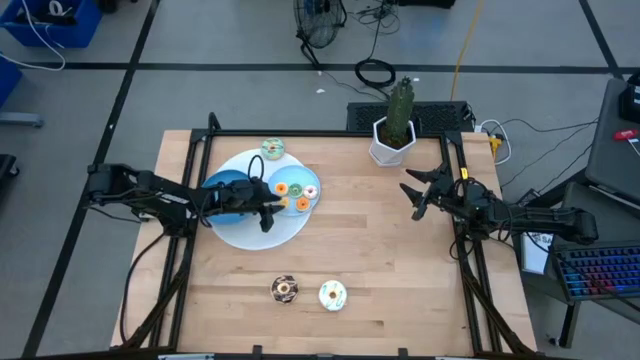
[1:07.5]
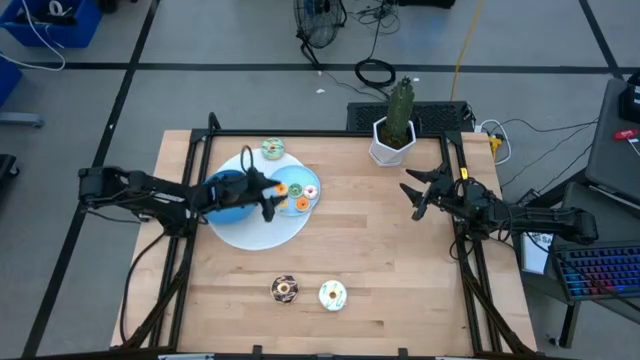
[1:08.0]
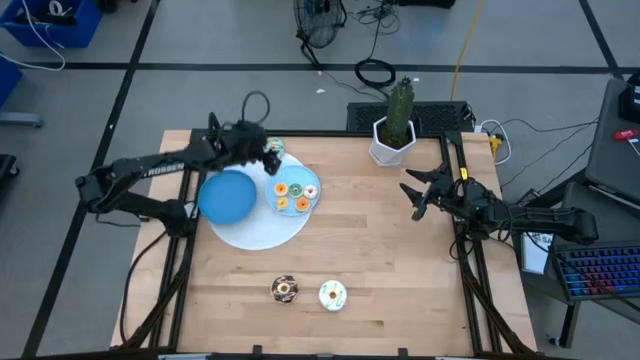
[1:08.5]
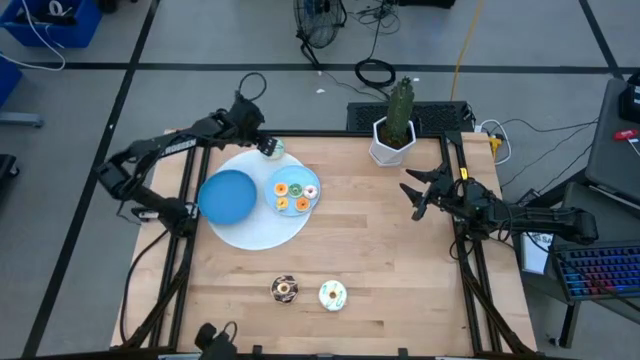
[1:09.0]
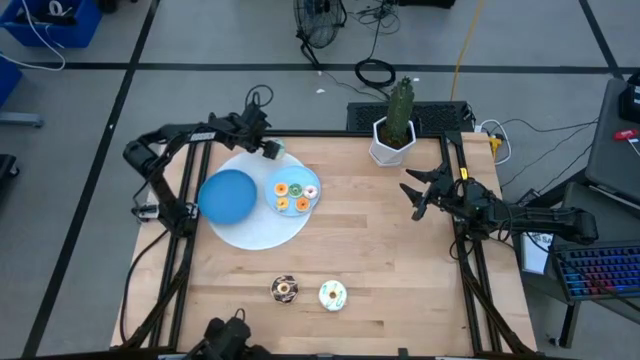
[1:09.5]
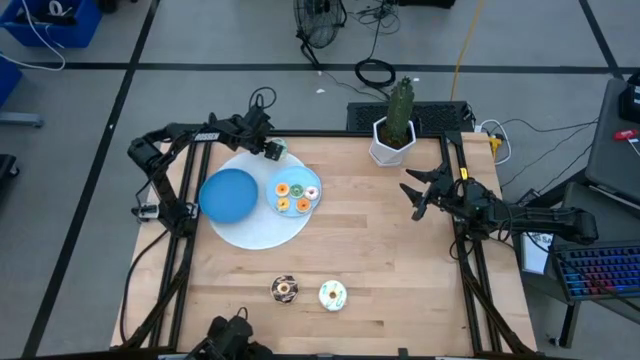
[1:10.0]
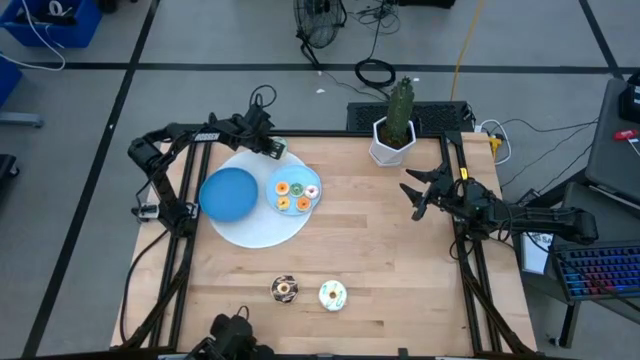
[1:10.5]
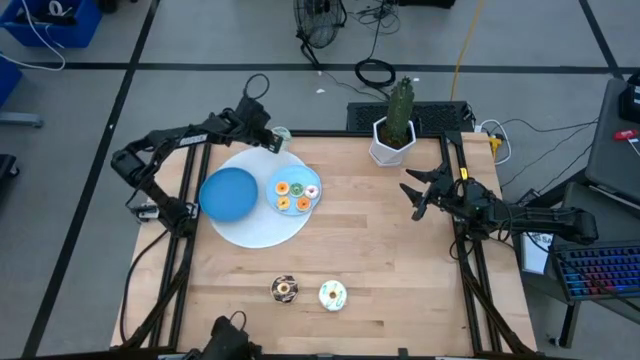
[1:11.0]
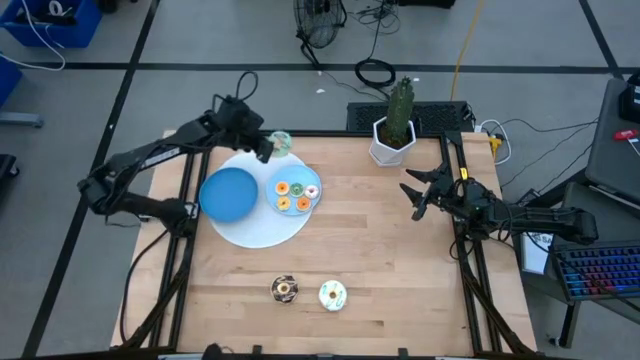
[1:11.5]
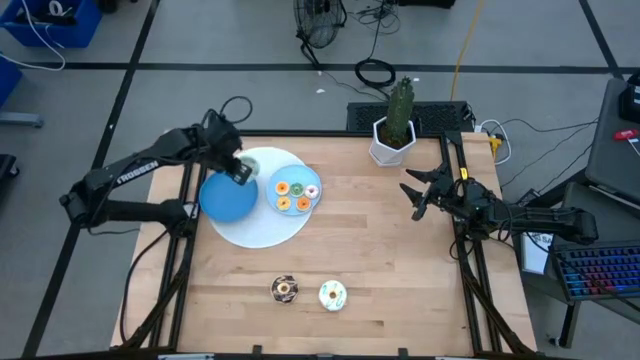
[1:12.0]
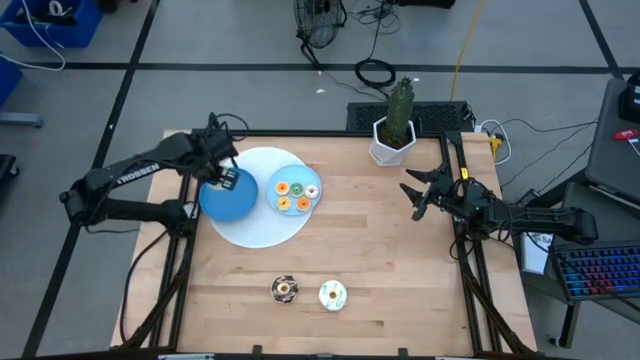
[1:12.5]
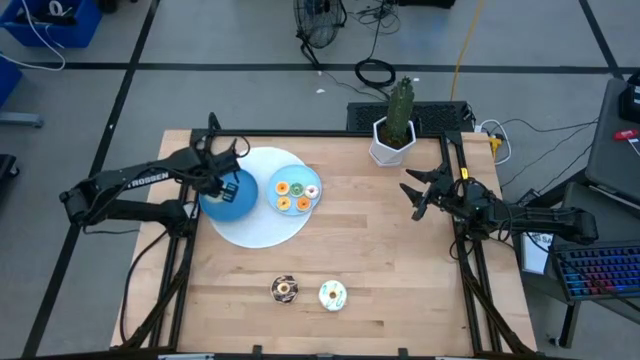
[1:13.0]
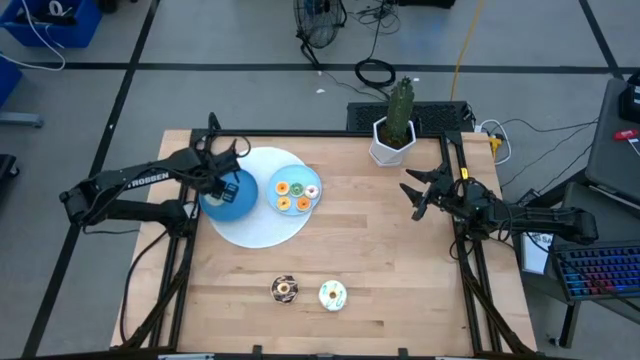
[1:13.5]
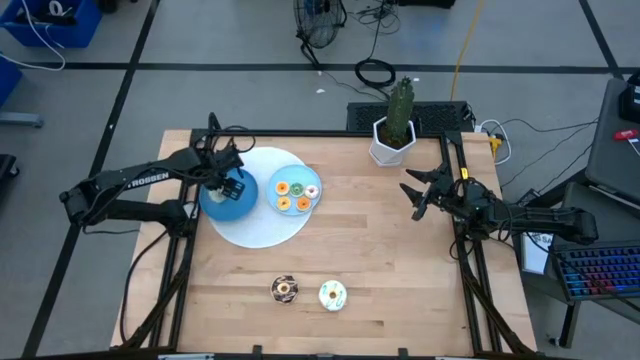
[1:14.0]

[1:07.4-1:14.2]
Task: Pick & Place donuts
Put the large green donut on the blue plate

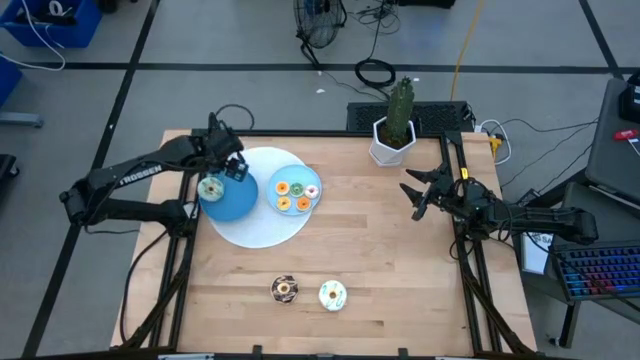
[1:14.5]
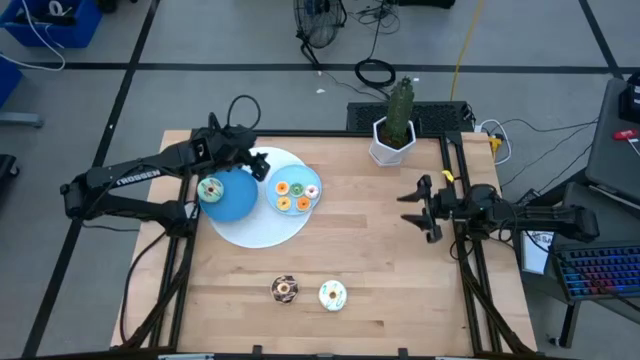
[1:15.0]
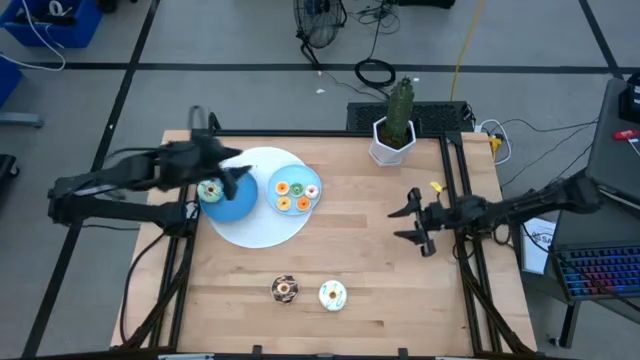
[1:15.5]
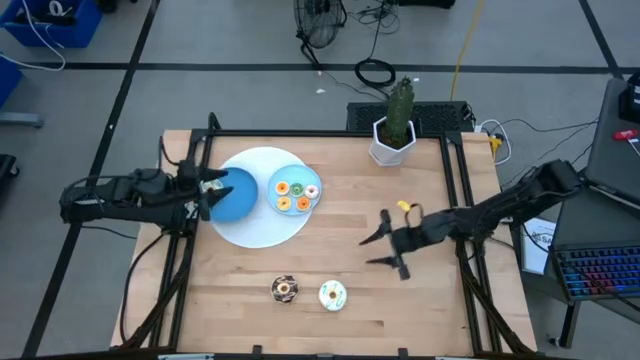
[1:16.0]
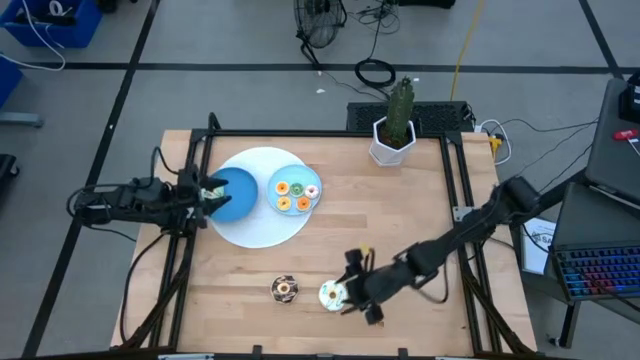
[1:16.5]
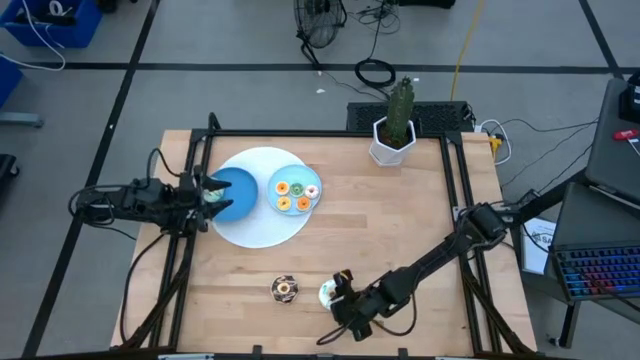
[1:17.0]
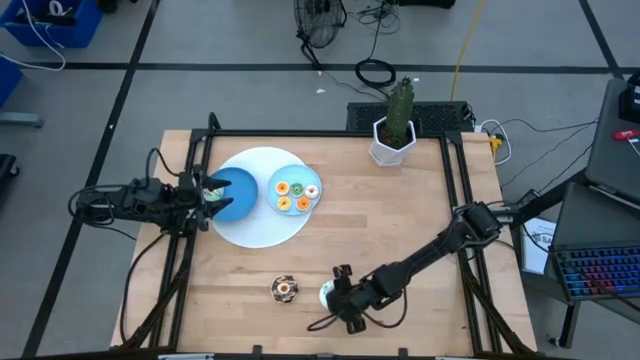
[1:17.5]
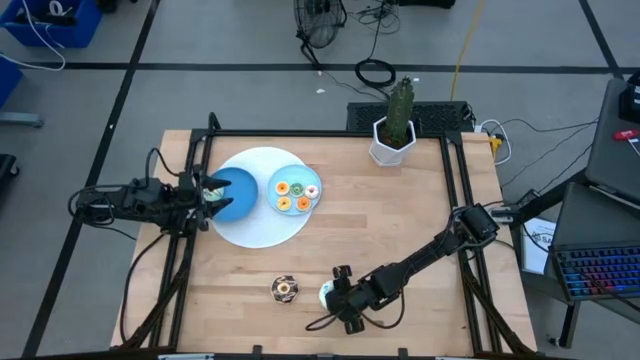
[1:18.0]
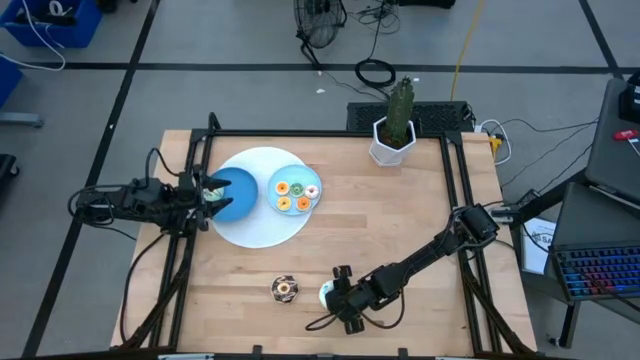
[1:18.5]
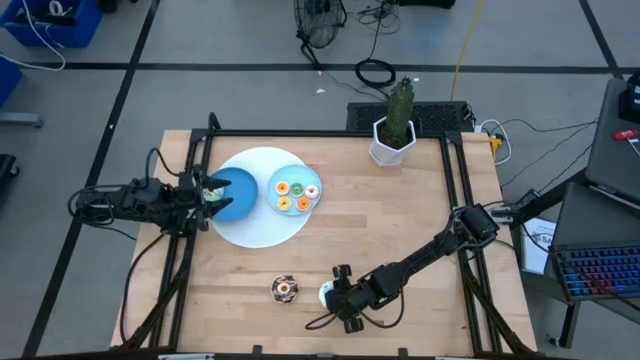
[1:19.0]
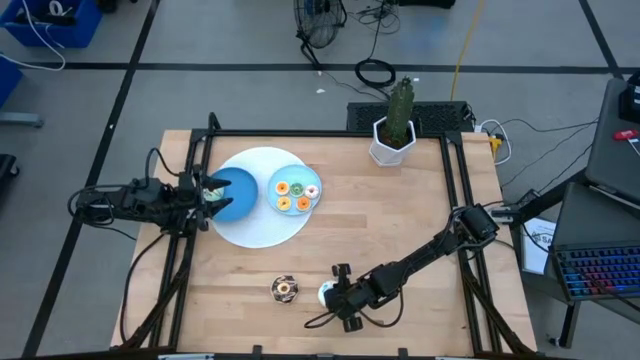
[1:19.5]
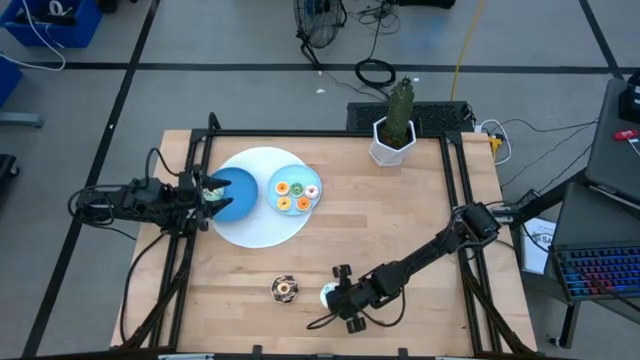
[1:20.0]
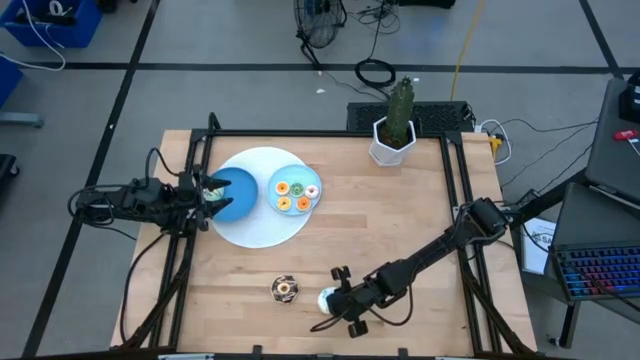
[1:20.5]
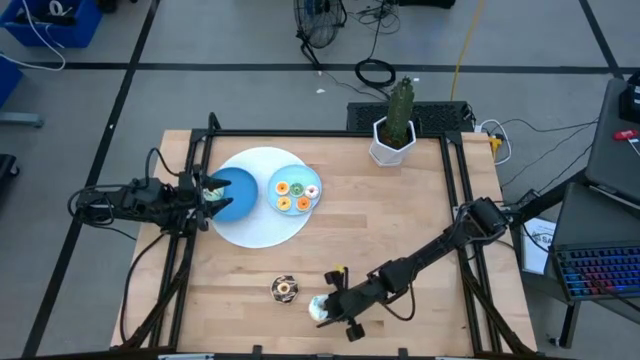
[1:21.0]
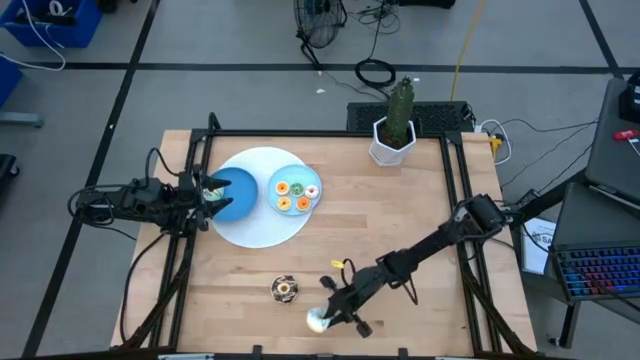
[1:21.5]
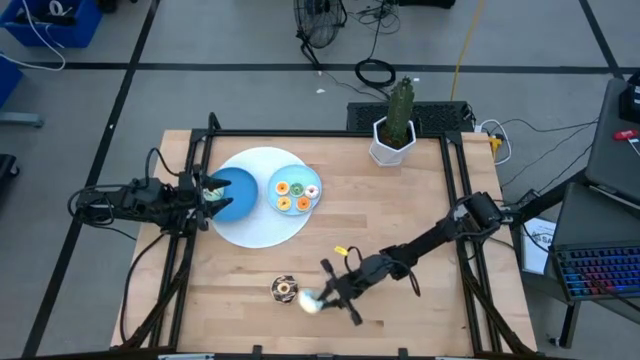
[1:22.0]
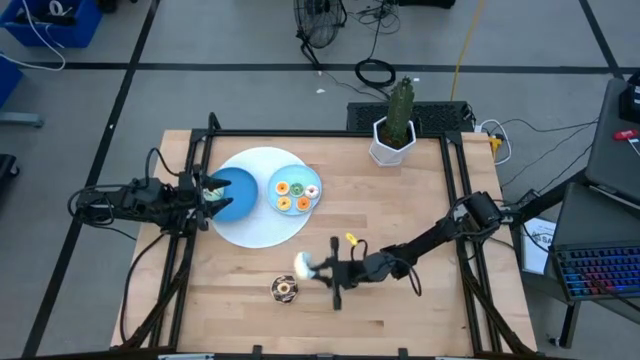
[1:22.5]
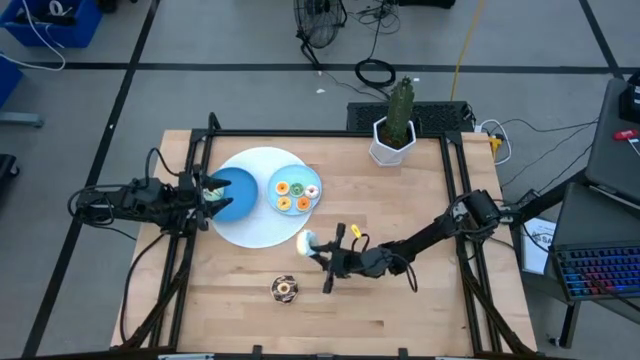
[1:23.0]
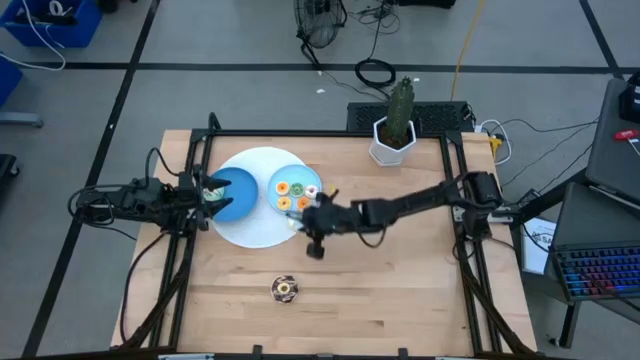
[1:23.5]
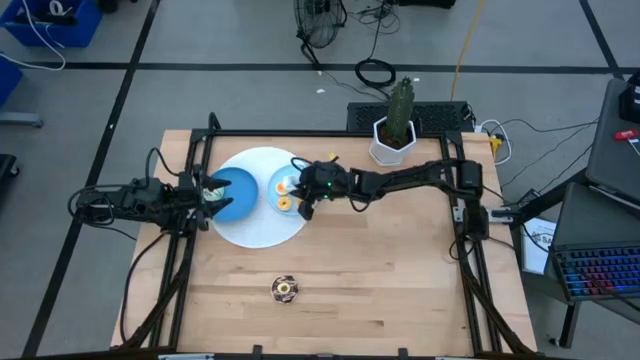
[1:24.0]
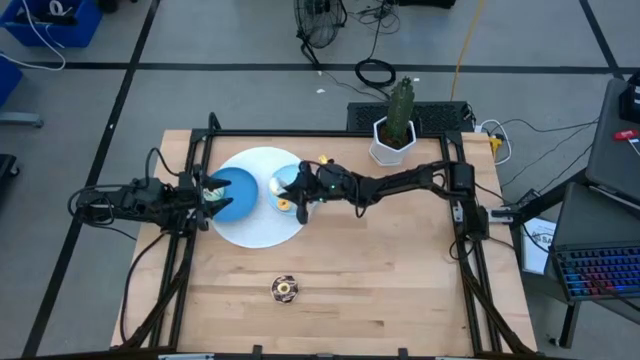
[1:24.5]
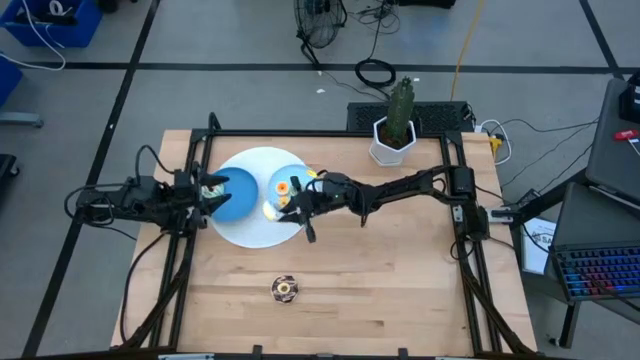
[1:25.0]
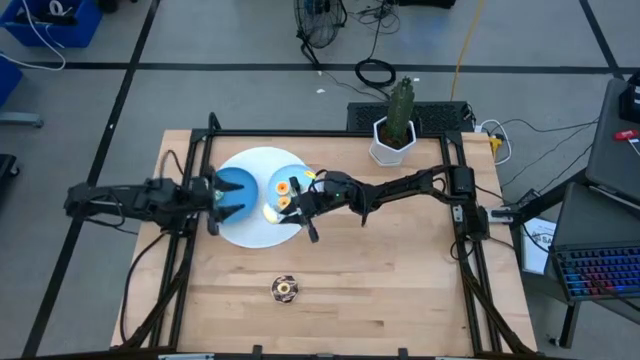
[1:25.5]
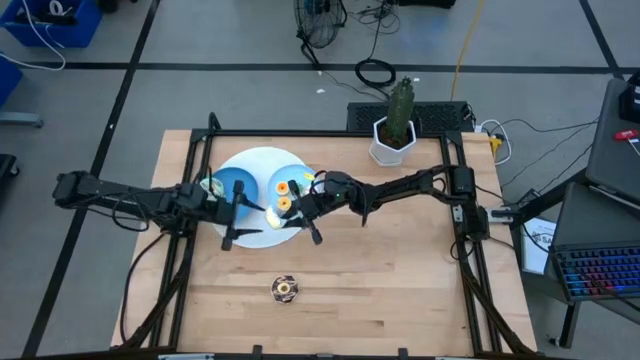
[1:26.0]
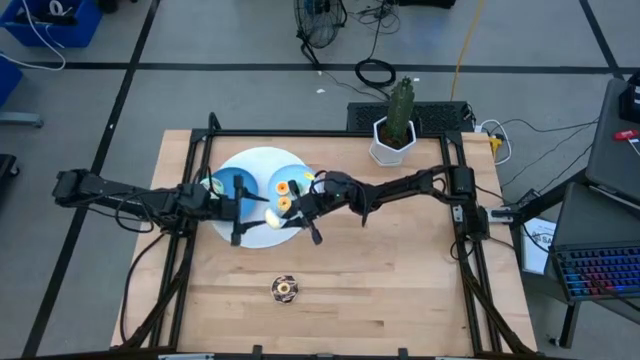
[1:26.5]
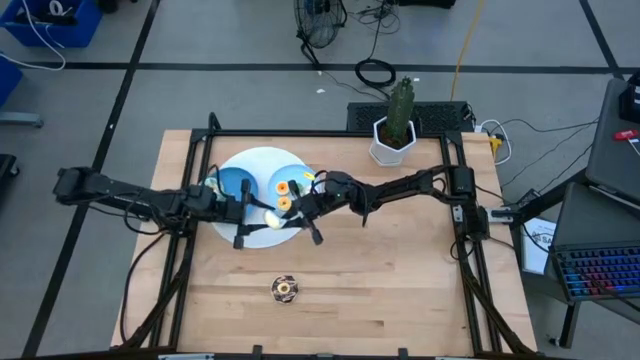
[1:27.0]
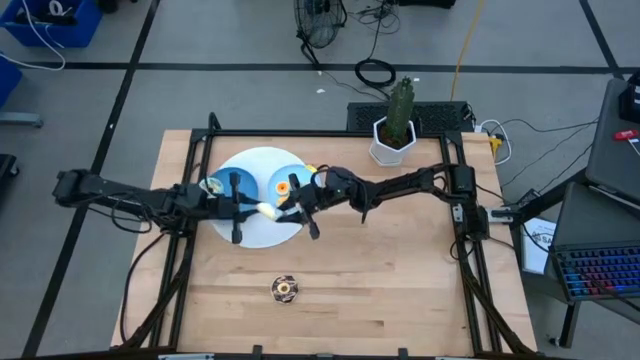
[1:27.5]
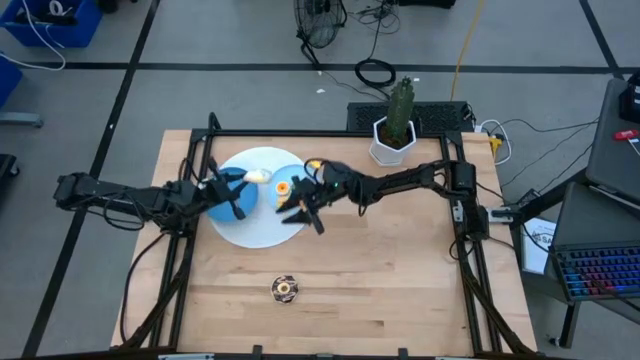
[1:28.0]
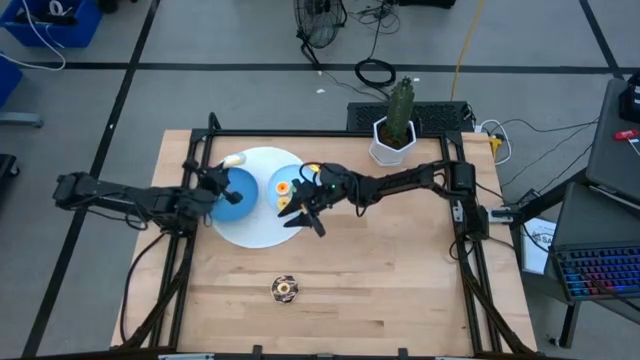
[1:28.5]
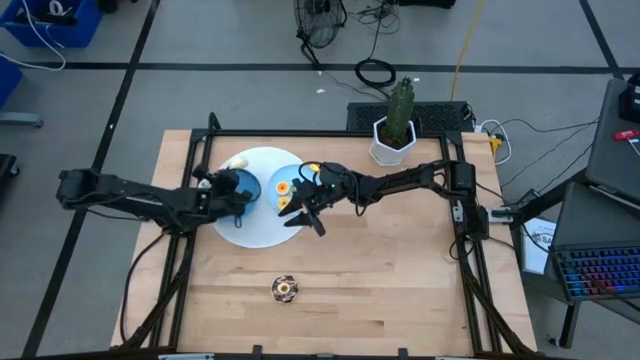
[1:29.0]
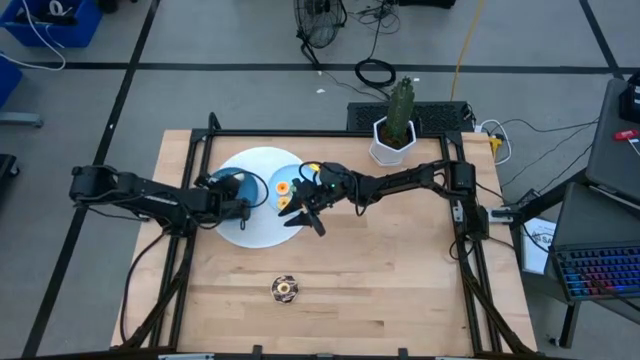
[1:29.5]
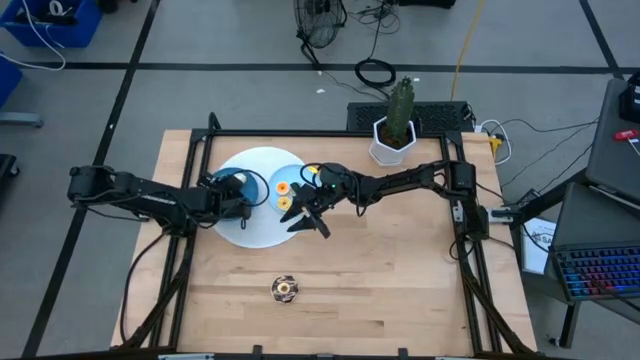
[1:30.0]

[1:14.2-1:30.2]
Put the large white donut on the blue plate
